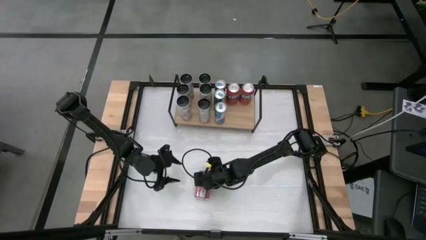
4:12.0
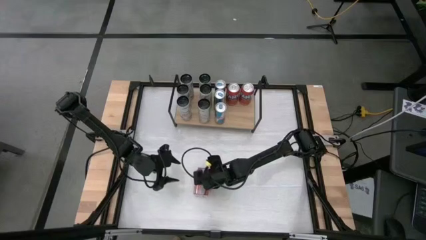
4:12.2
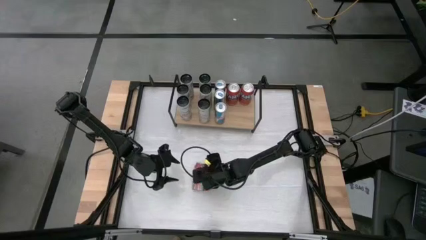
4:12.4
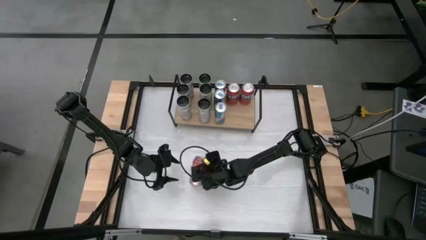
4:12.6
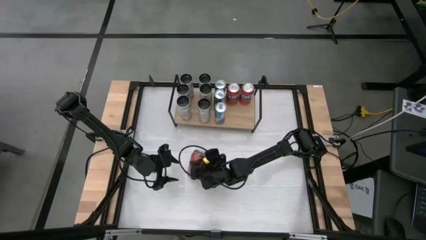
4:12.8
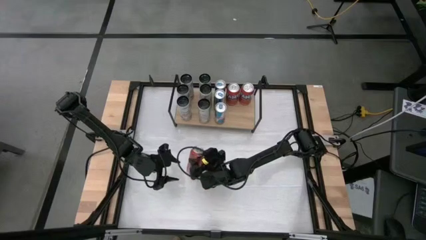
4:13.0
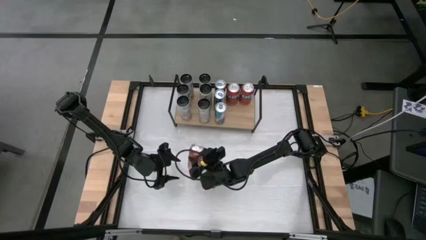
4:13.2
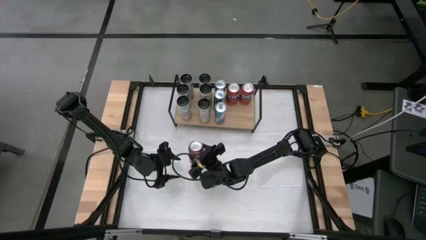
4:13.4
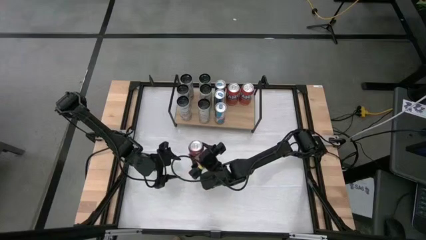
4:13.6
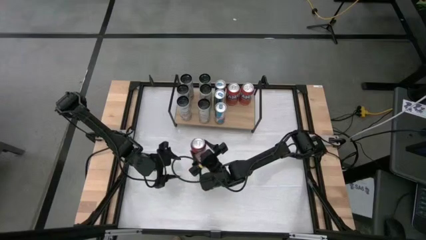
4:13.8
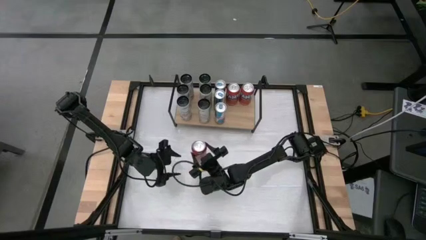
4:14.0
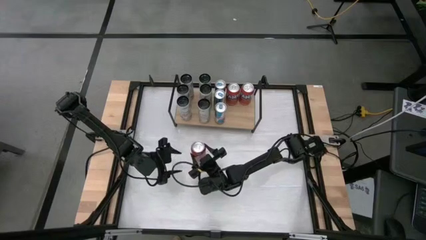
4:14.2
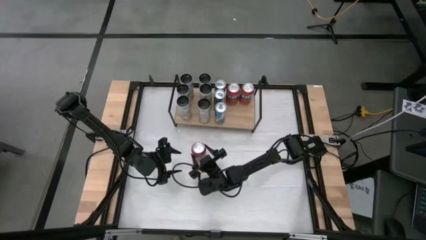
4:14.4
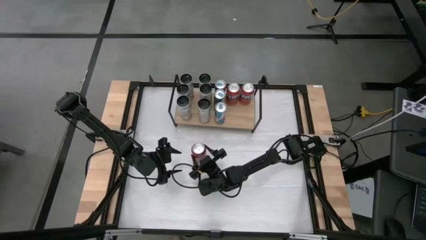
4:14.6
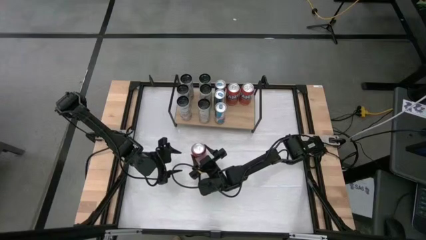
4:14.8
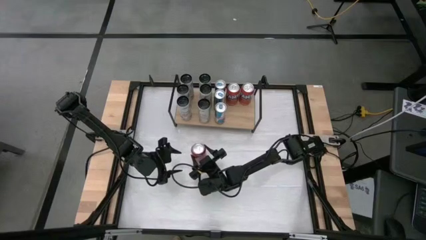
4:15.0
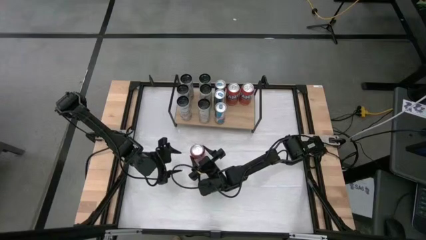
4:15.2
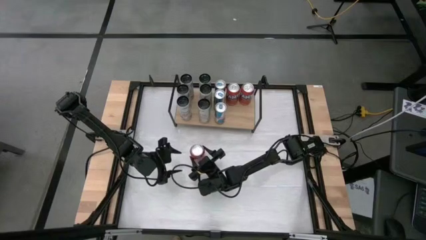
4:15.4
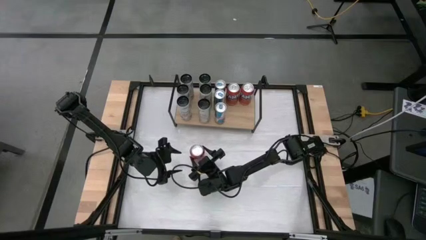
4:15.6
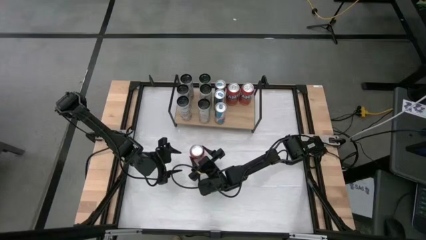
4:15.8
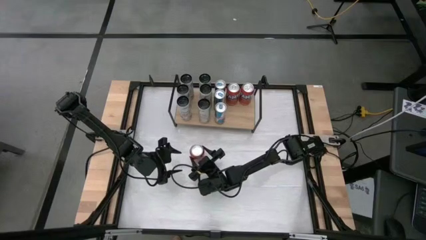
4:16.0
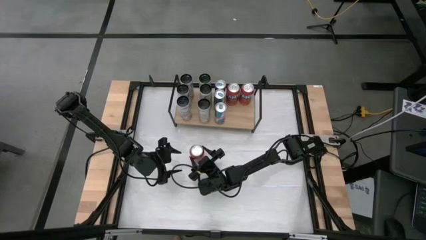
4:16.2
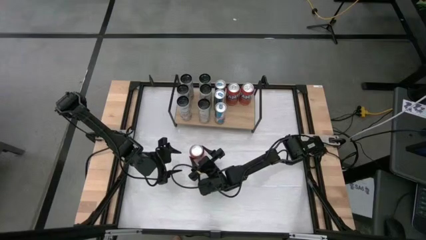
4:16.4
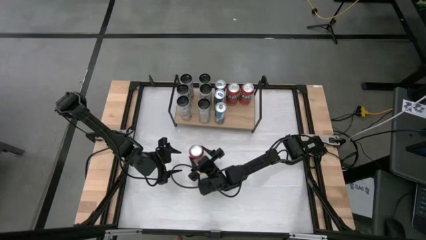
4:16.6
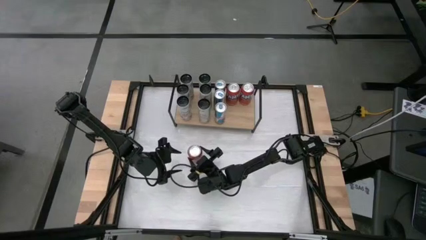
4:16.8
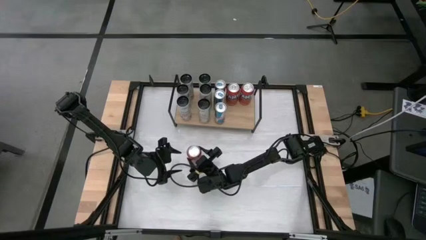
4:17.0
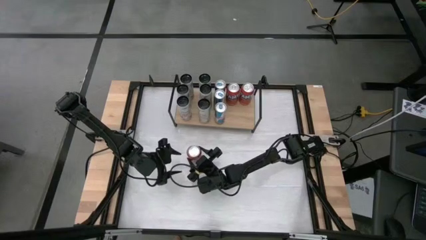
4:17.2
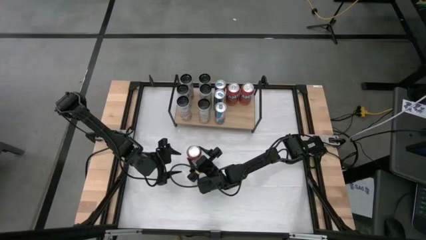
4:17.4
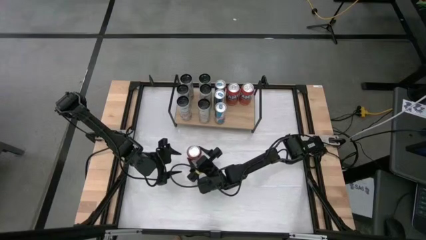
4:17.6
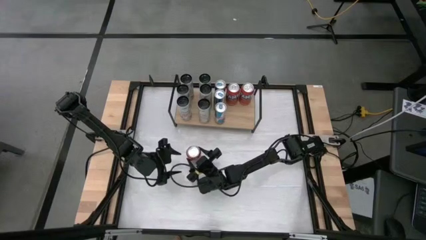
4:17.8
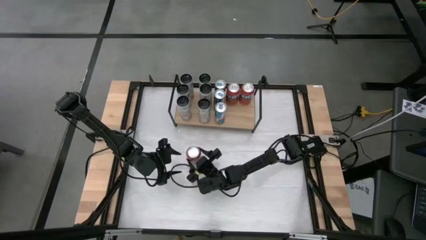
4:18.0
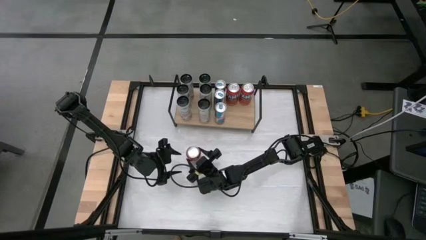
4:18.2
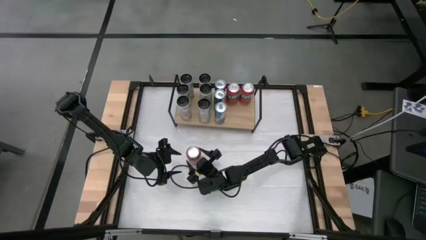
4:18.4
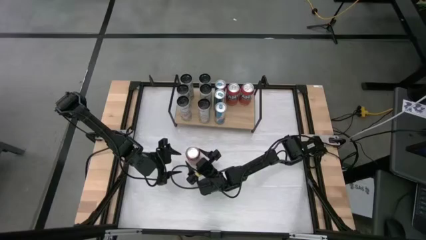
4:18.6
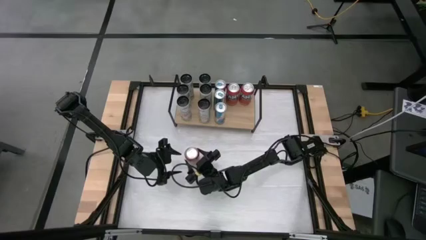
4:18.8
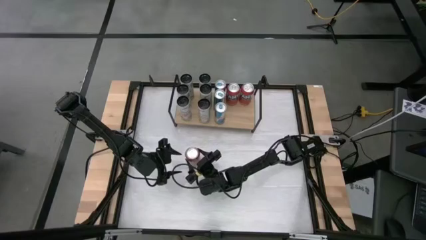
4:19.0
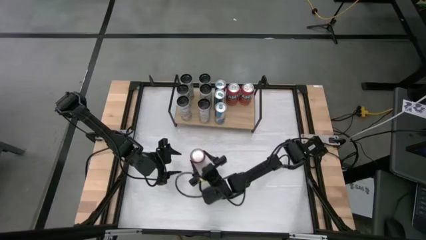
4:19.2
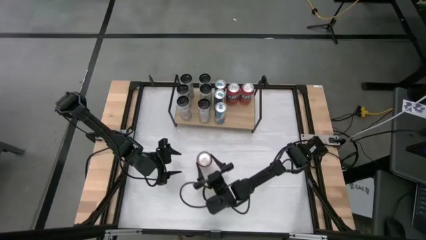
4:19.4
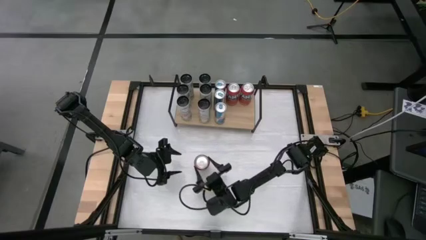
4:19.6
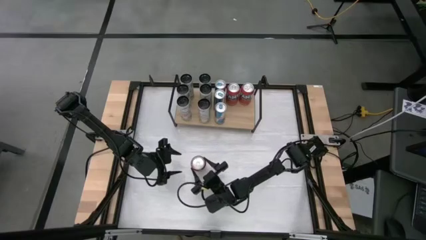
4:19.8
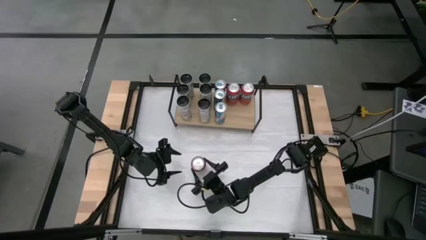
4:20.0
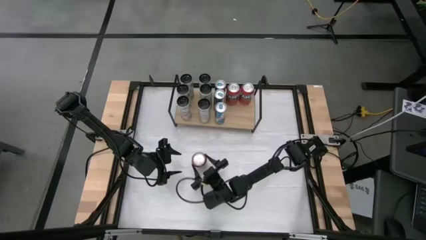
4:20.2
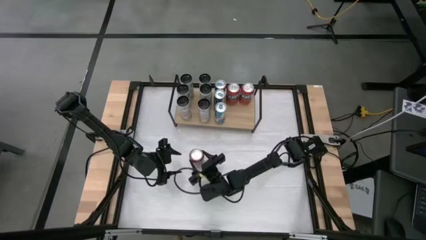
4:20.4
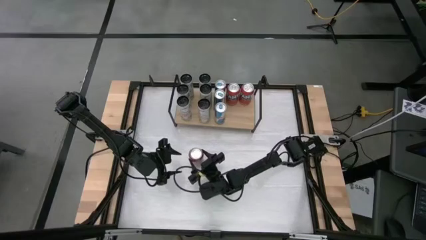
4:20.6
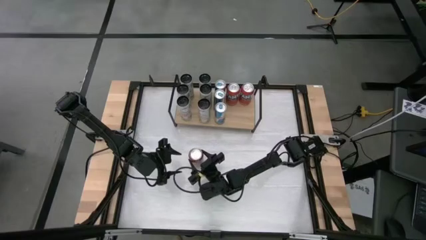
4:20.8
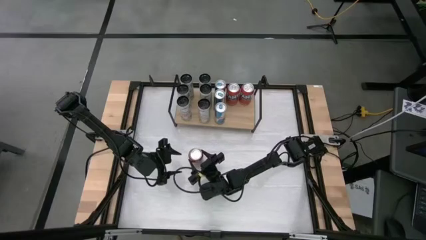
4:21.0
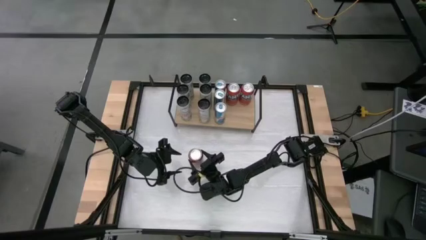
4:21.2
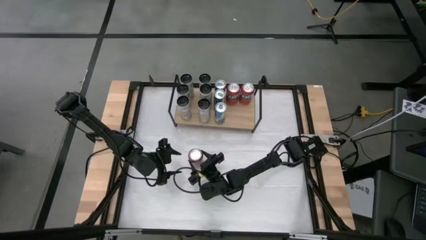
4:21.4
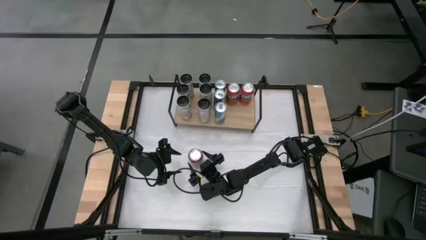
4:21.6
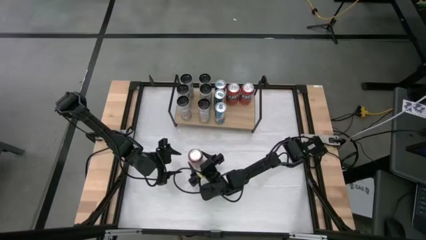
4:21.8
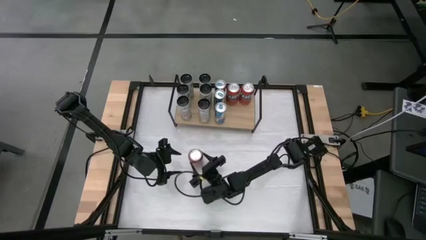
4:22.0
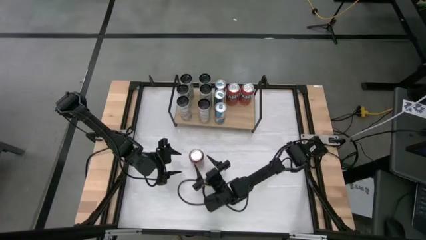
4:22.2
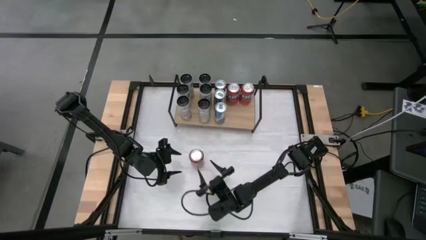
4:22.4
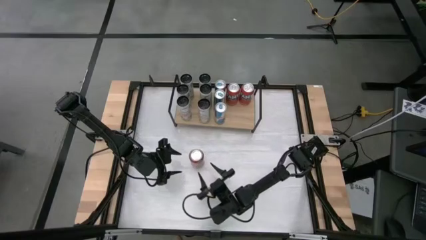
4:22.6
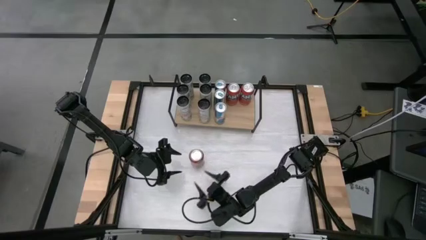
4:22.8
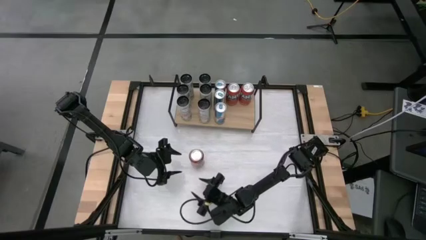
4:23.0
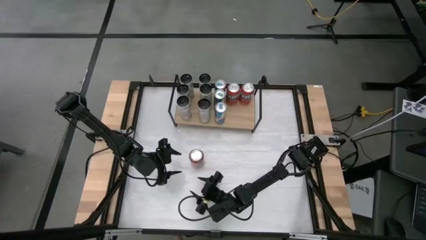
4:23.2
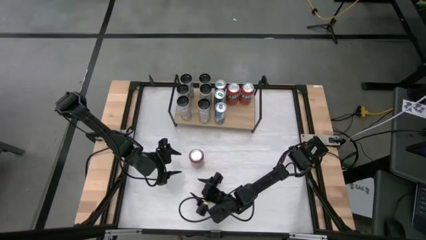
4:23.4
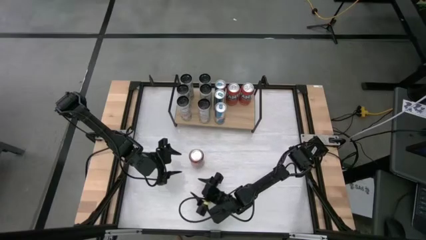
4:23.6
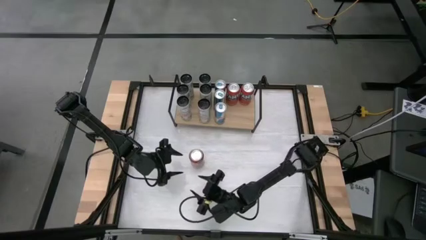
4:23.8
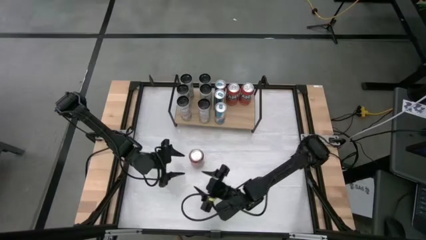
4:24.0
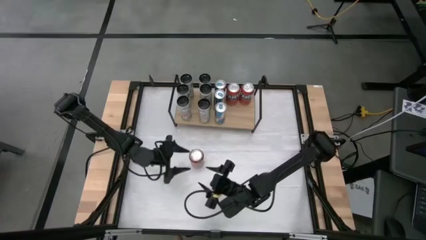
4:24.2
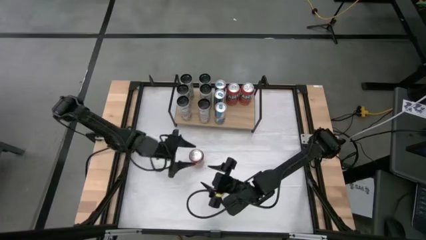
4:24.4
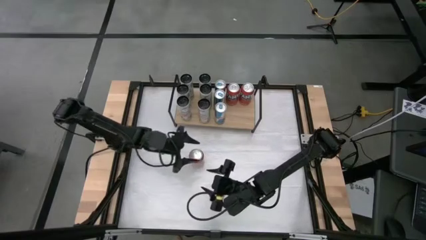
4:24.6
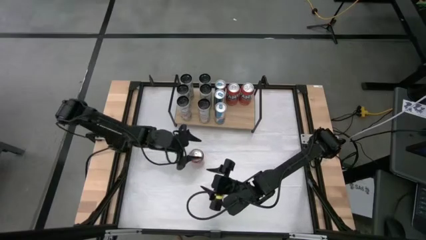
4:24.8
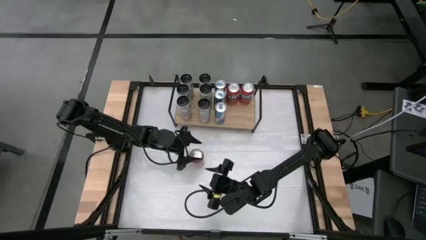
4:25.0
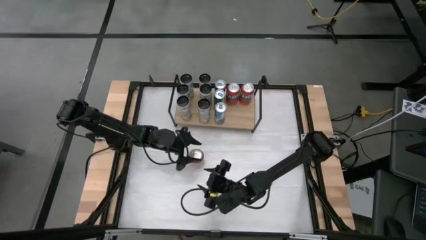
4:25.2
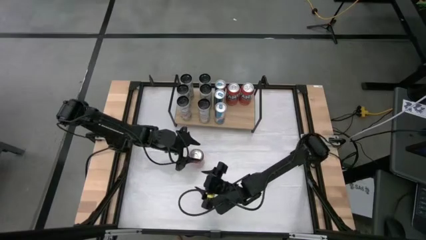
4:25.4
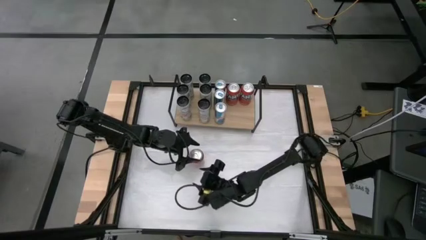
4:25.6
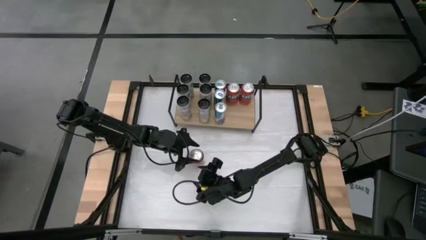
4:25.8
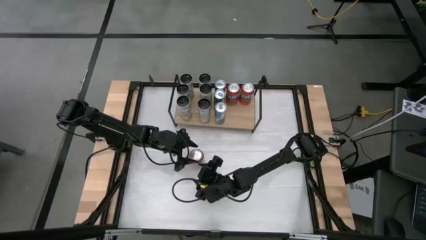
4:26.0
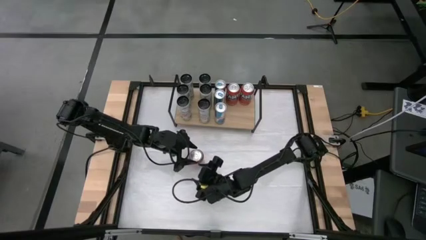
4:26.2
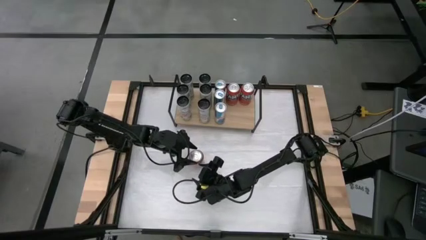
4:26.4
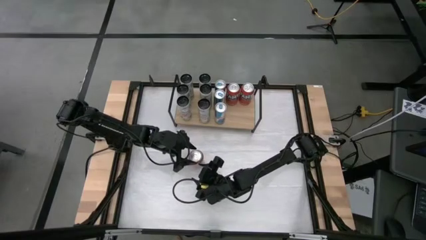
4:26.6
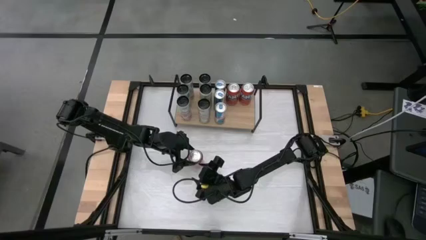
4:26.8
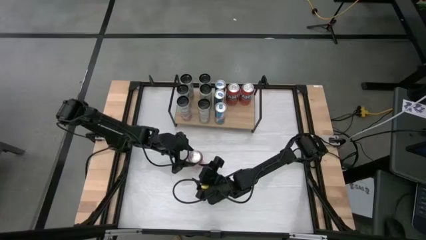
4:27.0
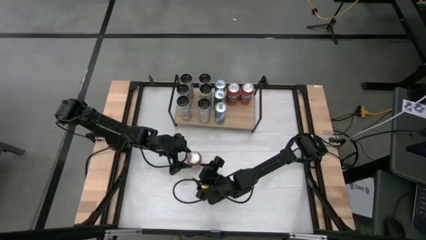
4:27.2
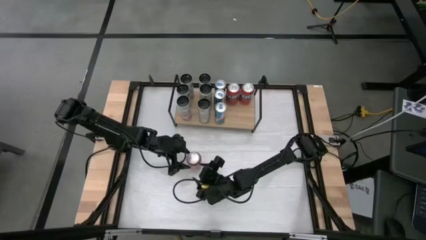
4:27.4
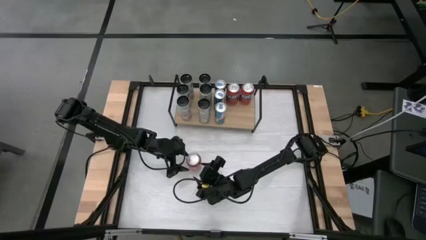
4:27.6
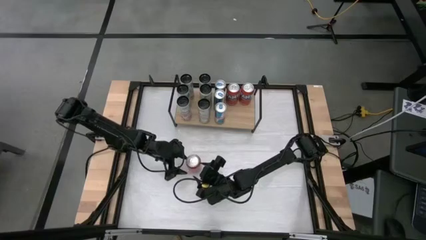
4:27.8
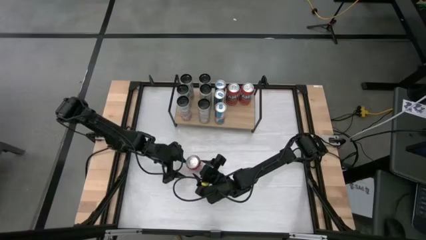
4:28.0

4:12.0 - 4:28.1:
Task: Place canned beverage on shelf
Put the red soda can on the shelf
